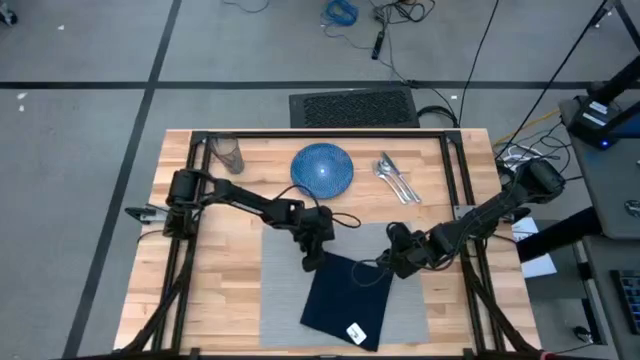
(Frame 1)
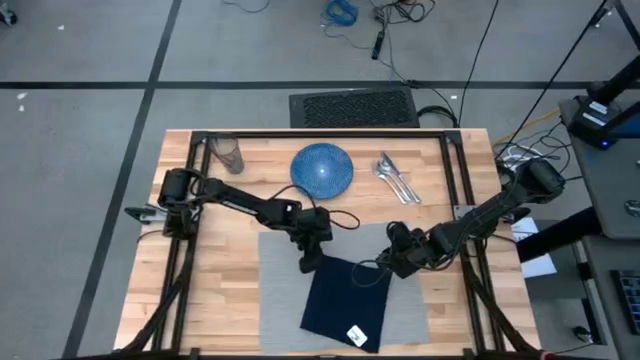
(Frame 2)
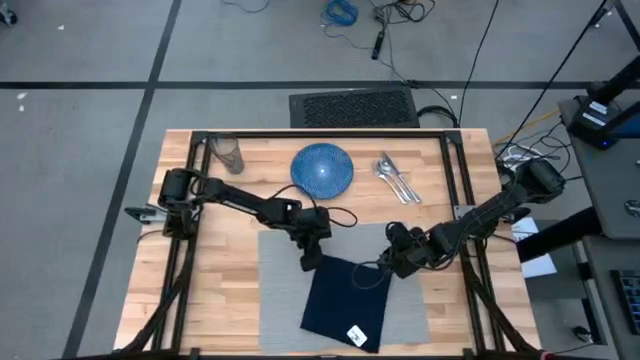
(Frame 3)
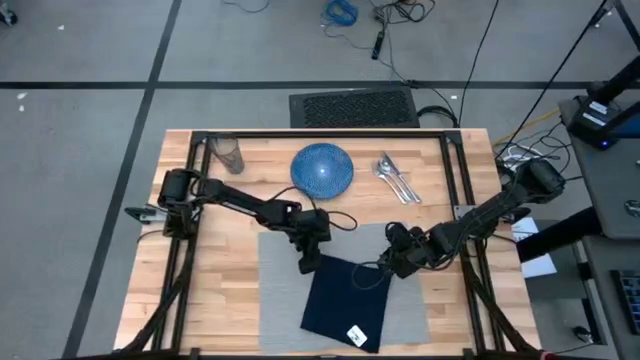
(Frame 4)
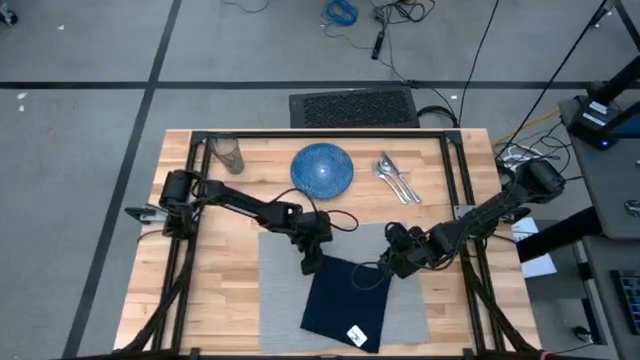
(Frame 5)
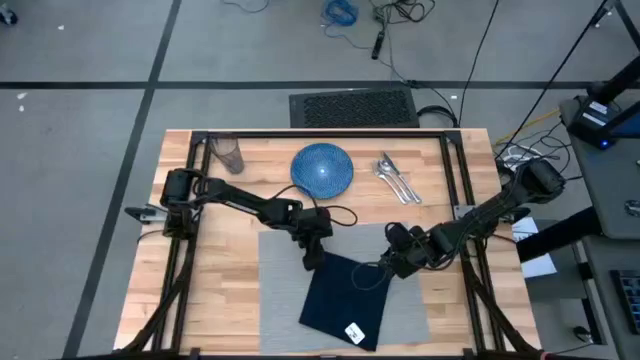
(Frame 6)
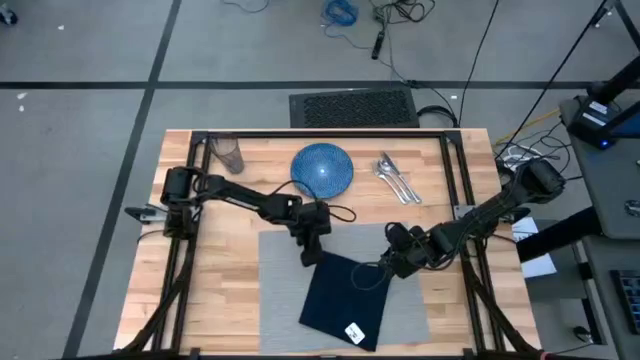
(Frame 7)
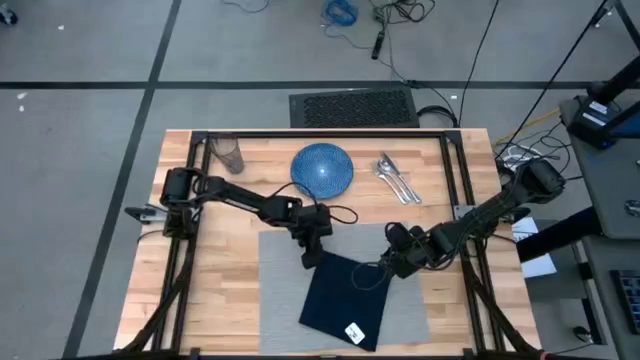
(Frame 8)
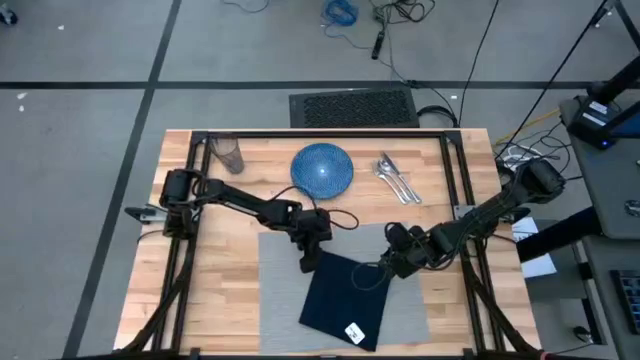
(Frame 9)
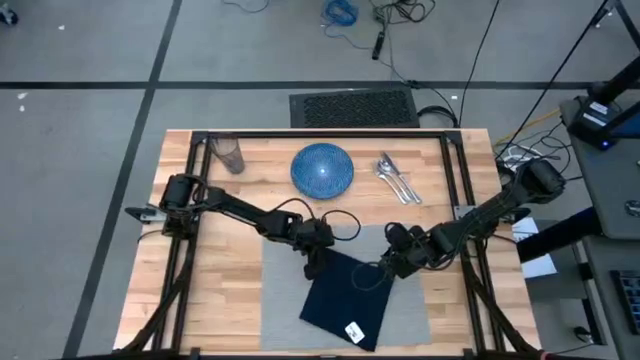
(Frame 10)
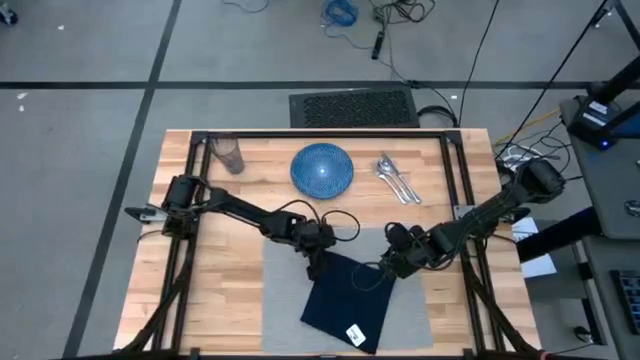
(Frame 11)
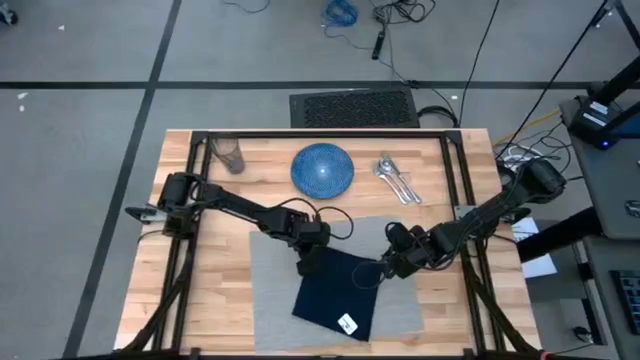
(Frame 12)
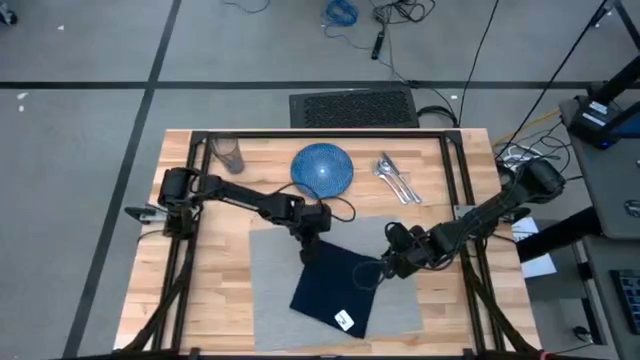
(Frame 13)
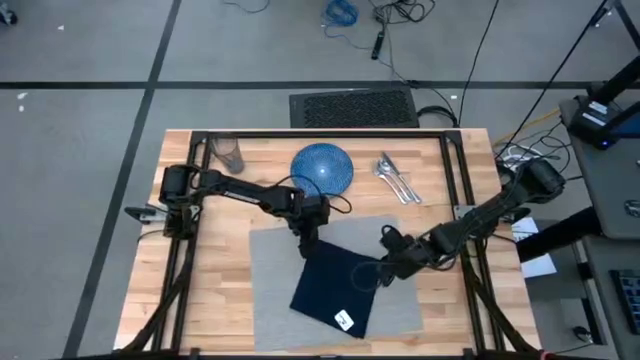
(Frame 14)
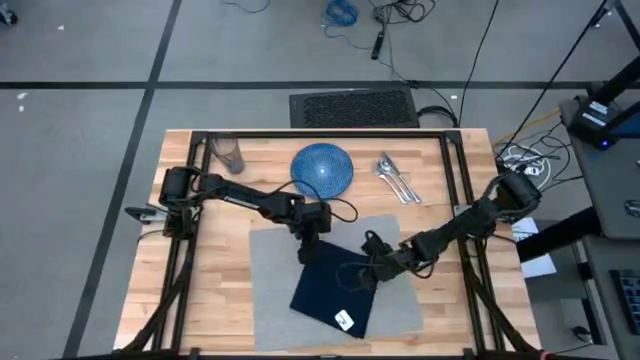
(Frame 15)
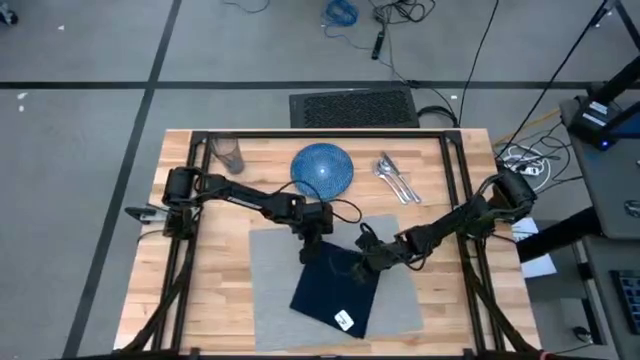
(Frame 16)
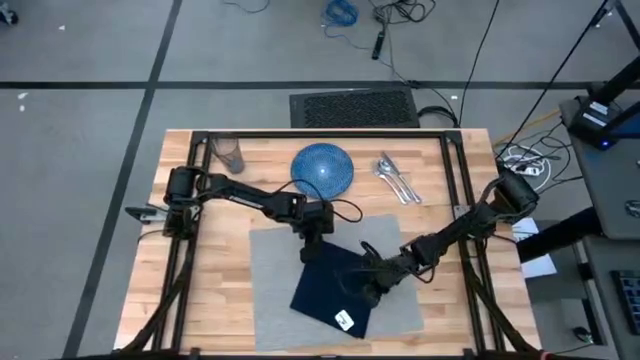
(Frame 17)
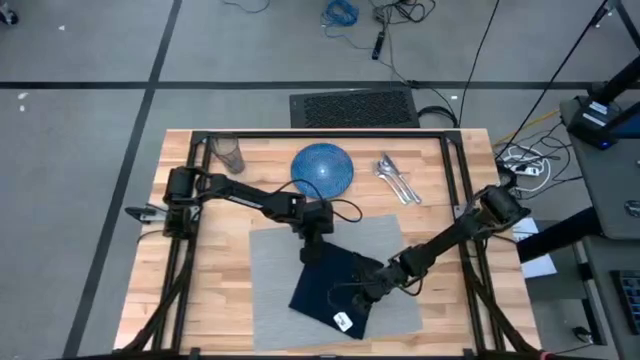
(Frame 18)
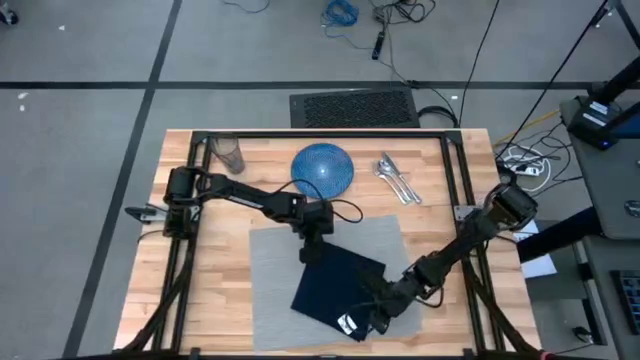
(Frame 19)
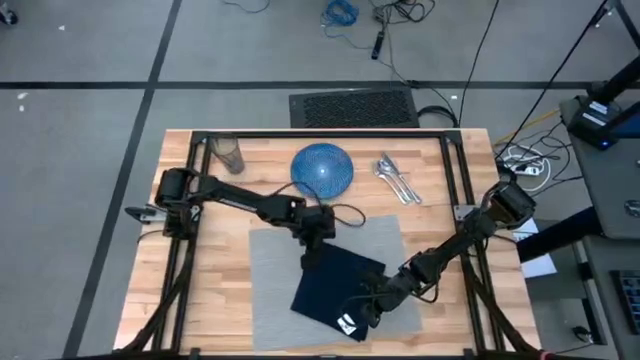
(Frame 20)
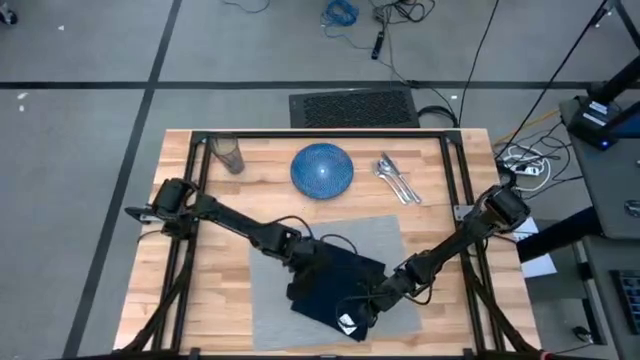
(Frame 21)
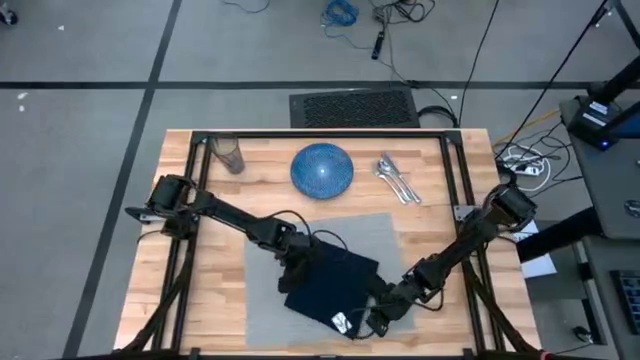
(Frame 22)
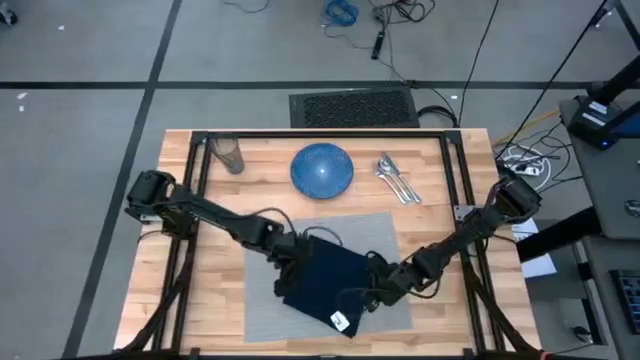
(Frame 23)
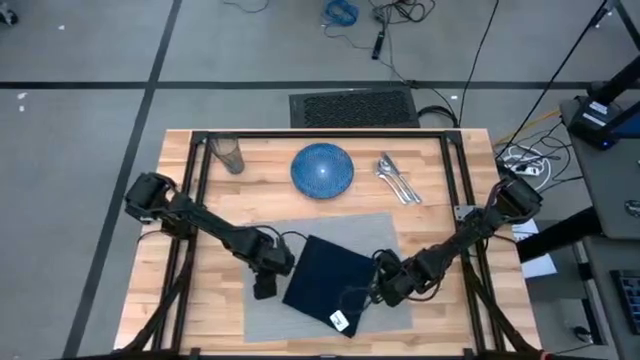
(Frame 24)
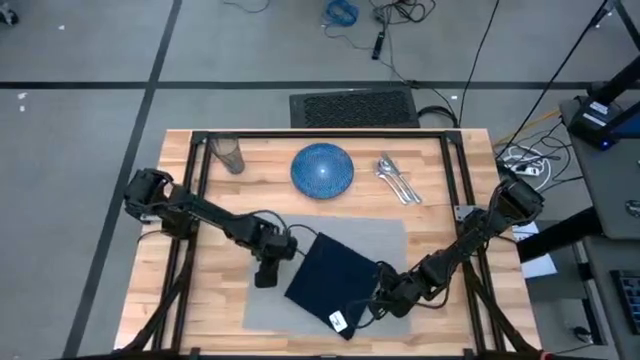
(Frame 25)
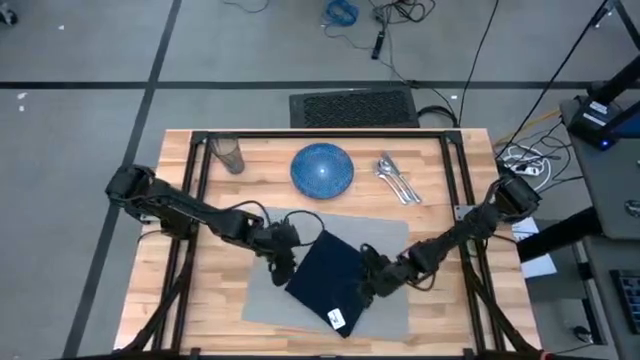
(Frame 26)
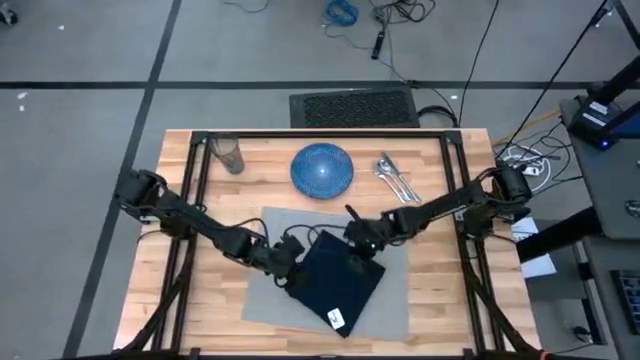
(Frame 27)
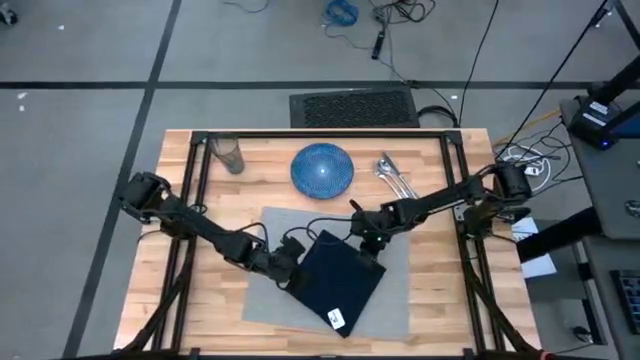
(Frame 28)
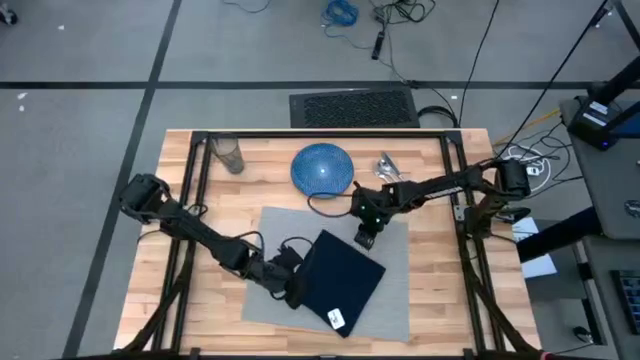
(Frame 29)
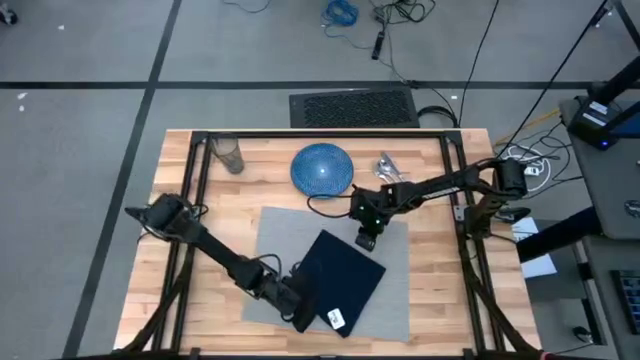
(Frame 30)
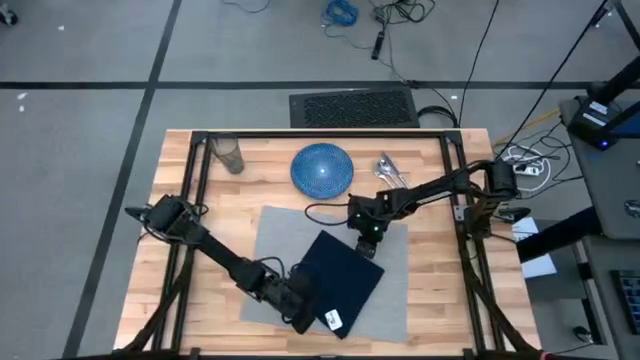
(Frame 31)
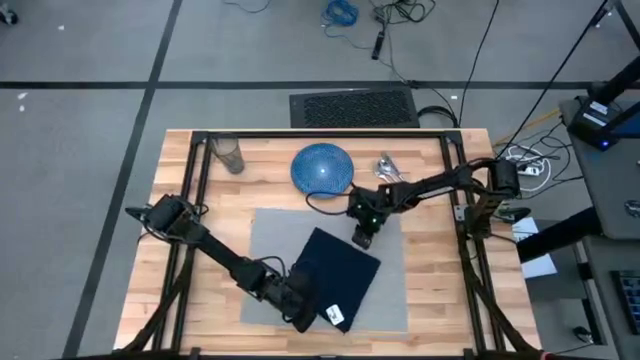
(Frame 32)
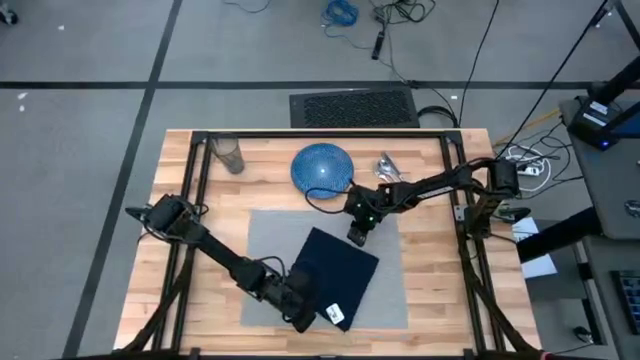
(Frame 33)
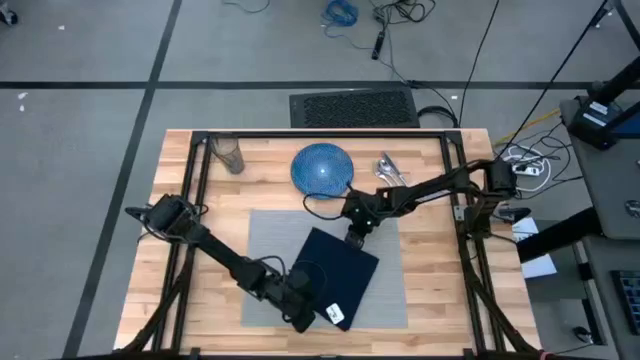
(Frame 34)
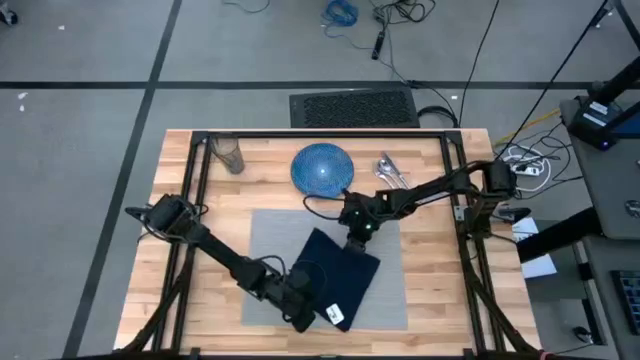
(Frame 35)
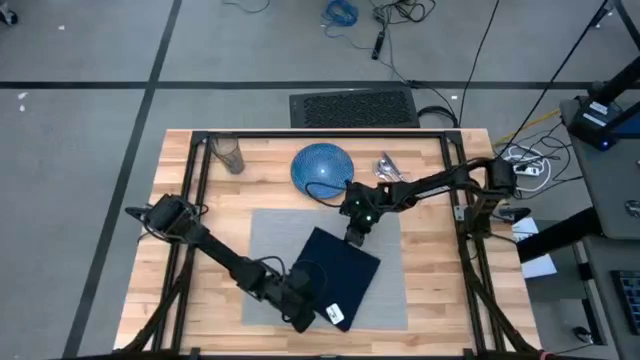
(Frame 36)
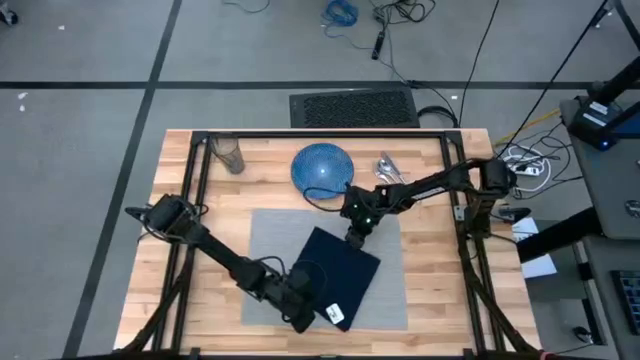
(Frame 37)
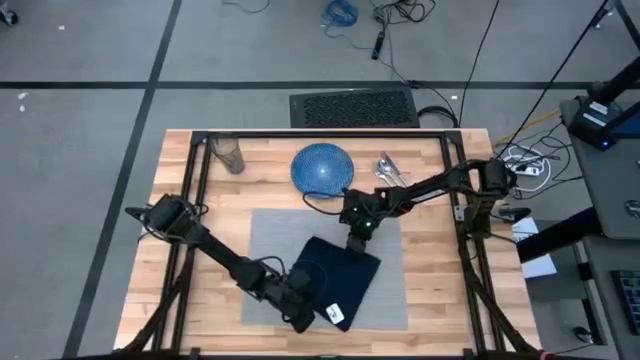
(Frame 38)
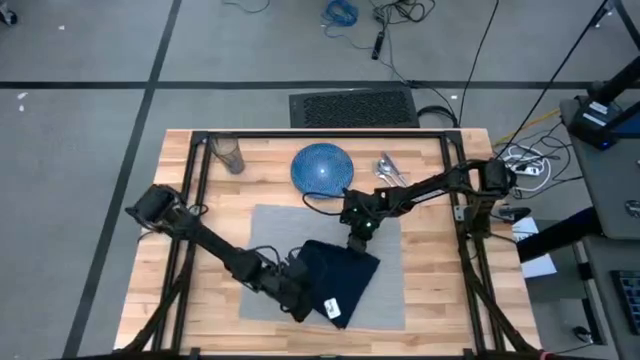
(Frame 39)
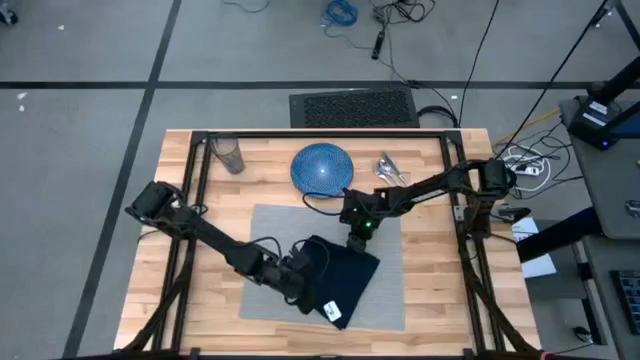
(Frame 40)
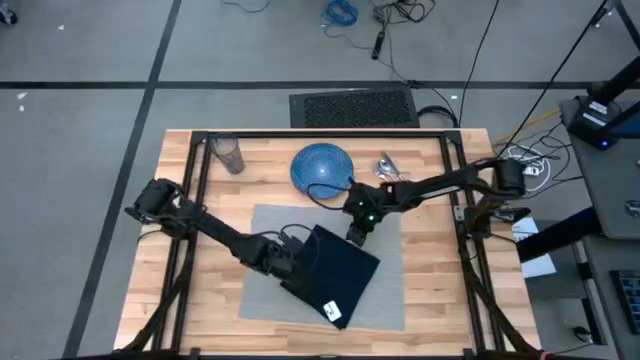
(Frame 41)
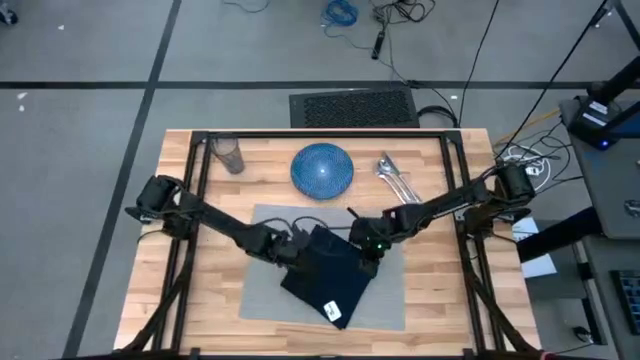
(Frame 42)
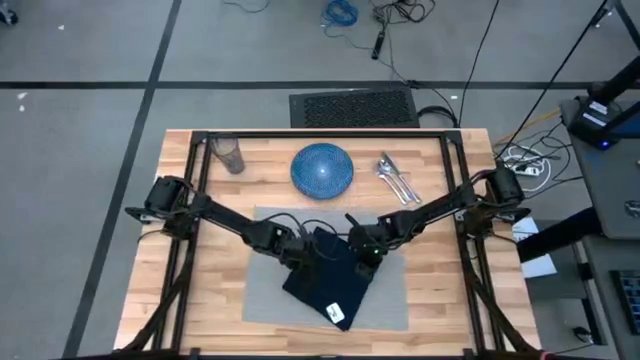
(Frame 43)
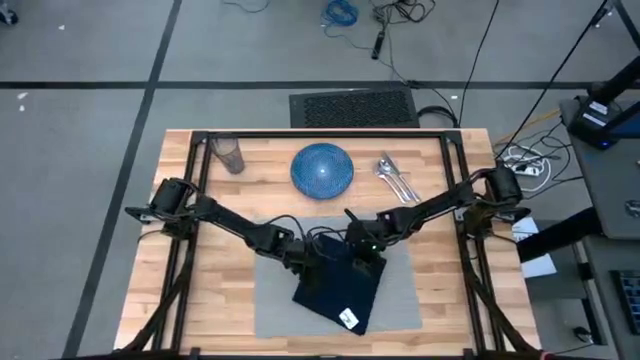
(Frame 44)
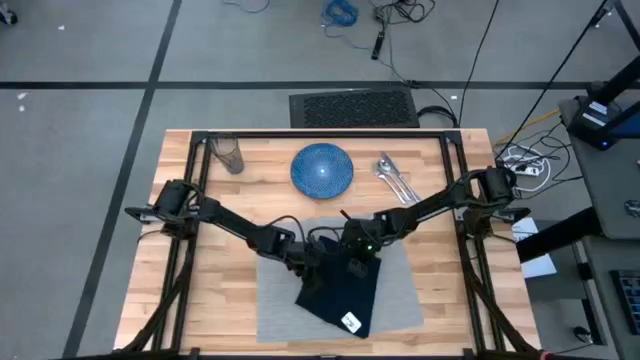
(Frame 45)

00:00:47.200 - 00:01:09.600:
Task: Set table place
Fold the blue table napkin
